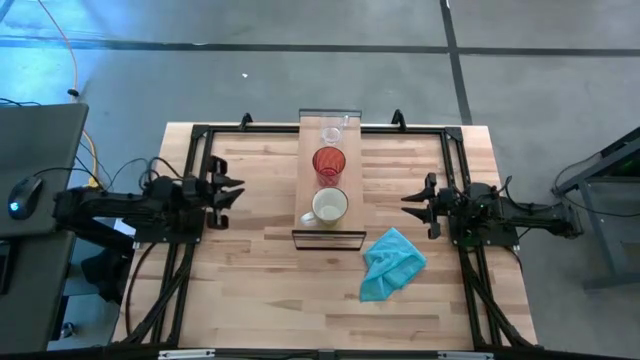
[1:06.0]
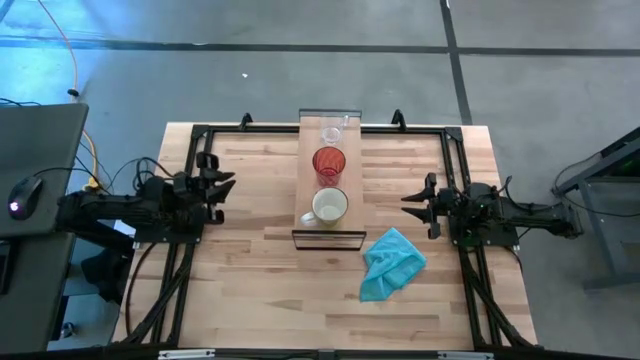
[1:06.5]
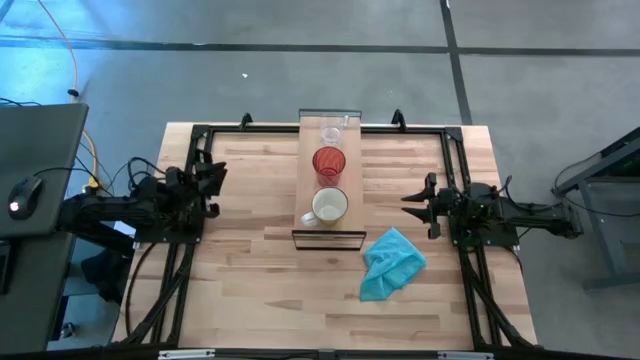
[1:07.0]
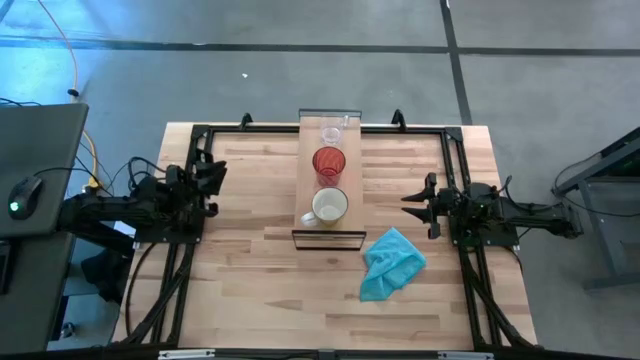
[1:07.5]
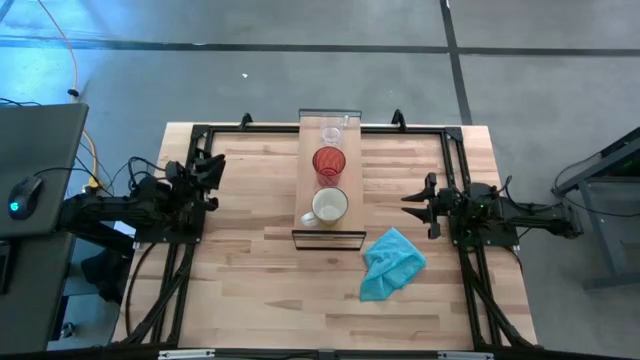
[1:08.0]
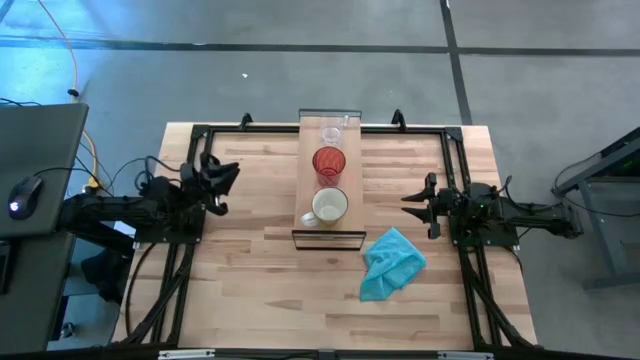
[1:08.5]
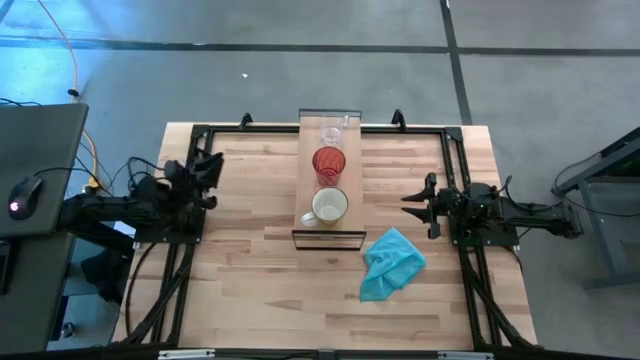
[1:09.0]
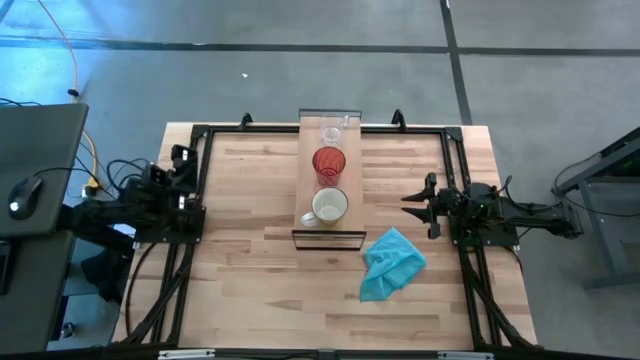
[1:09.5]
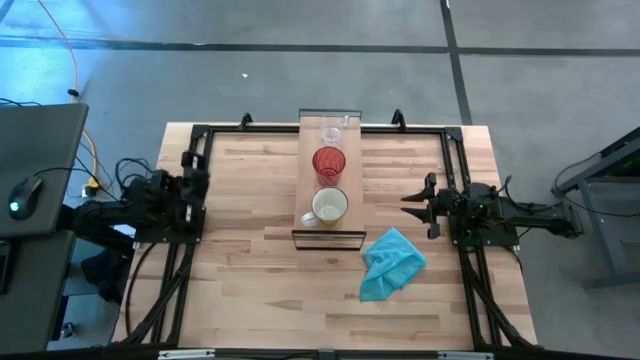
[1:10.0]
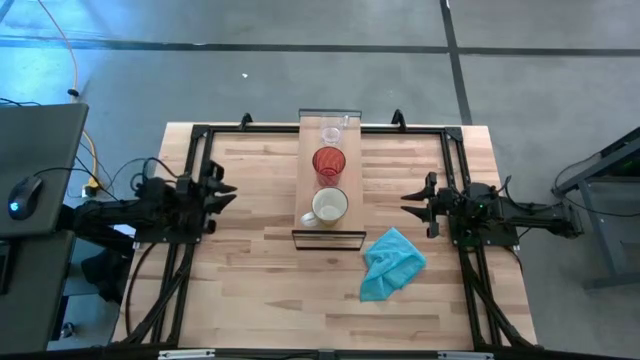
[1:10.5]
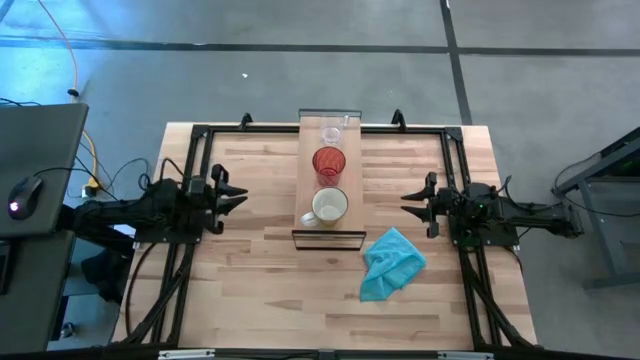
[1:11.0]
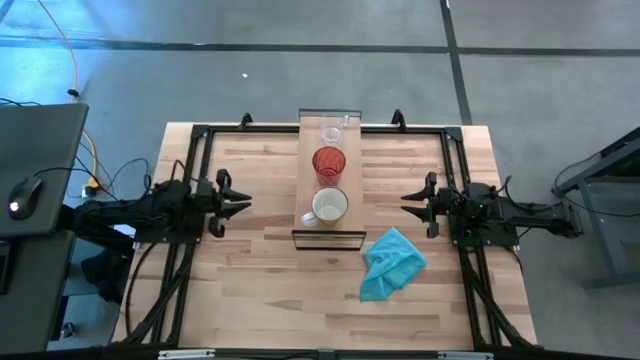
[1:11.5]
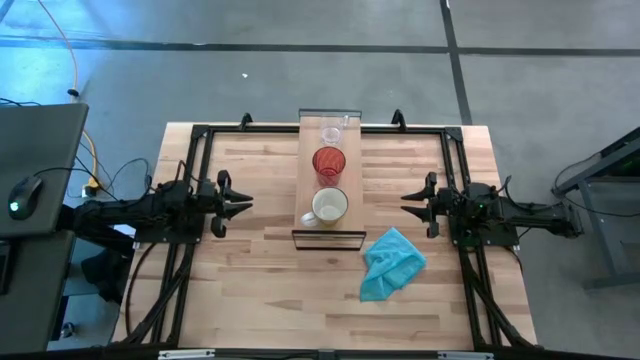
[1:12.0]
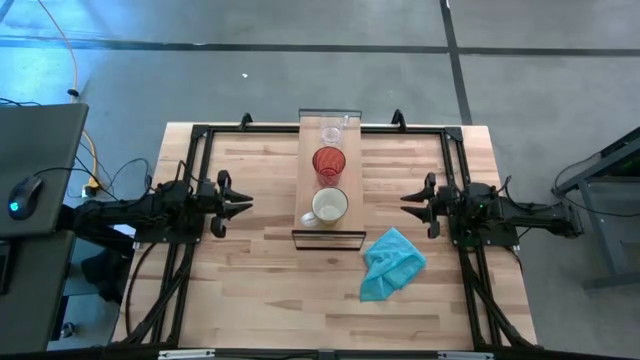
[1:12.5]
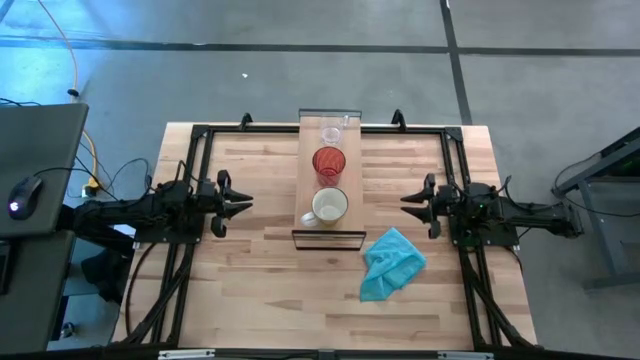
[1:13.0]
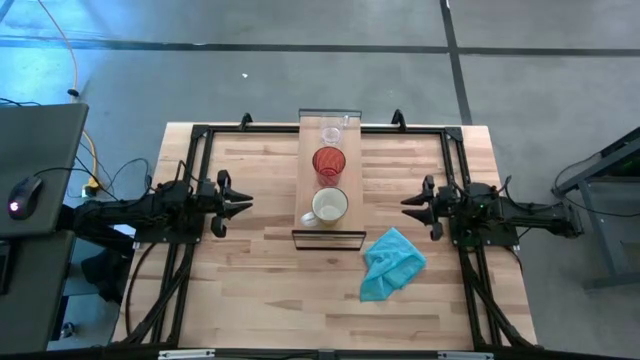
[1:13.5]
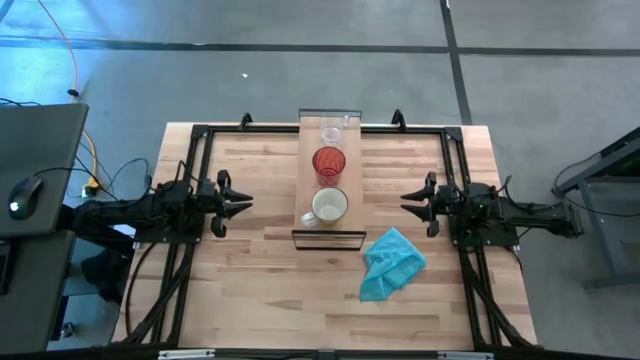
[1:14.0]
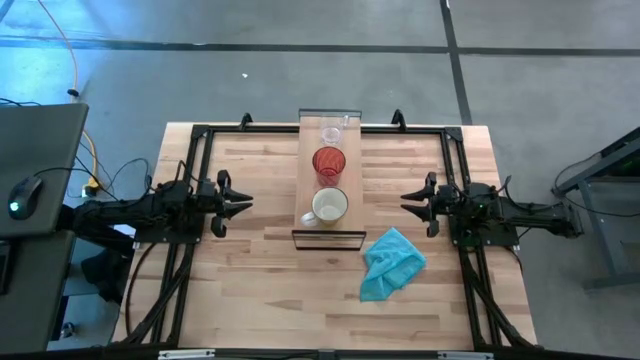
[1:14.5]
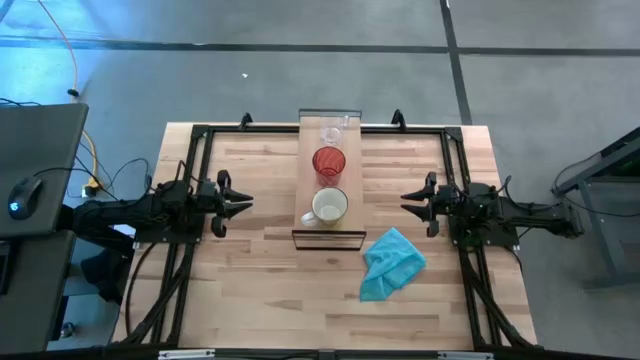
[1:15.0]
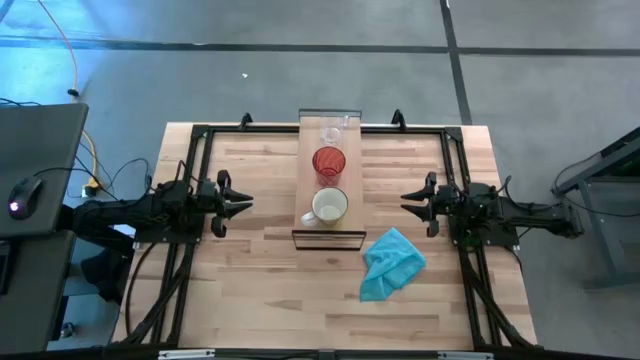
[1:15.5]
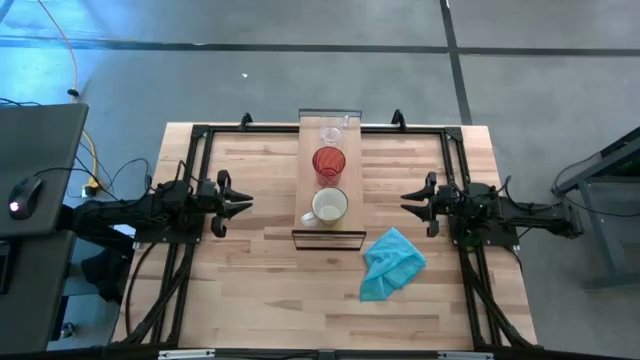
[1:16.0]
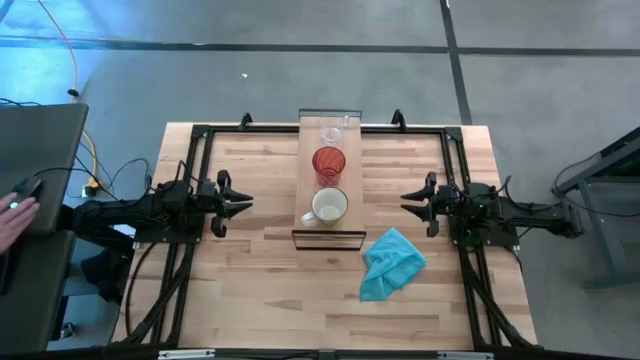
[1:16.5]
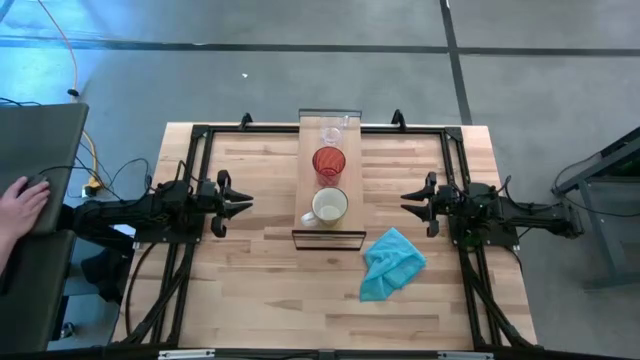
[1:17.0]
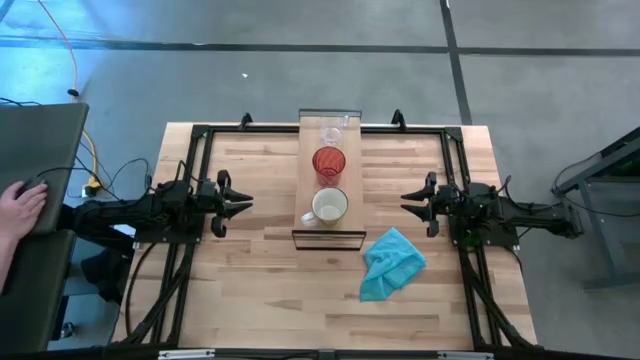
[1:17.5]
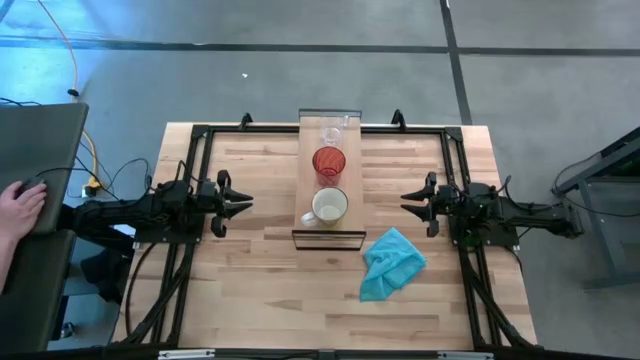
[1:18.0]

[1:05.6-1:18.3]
Task: Stack small to large cups/mugs on shelf
Return to Home Position

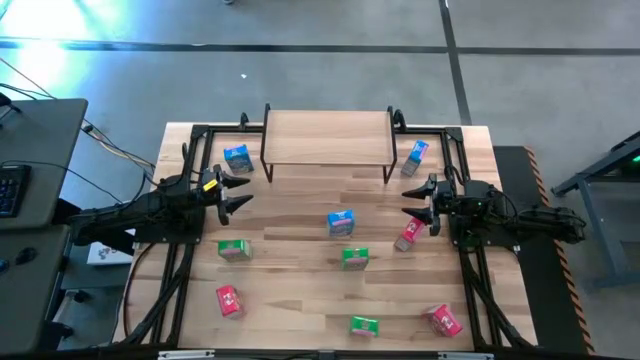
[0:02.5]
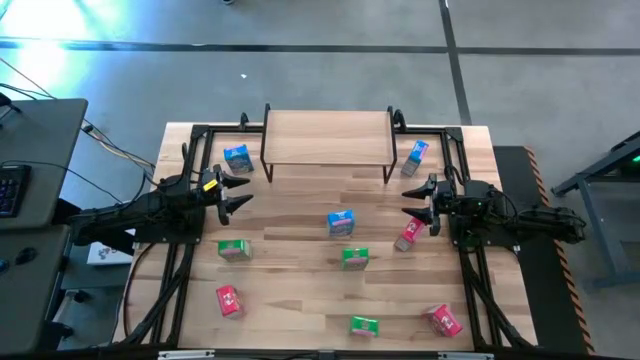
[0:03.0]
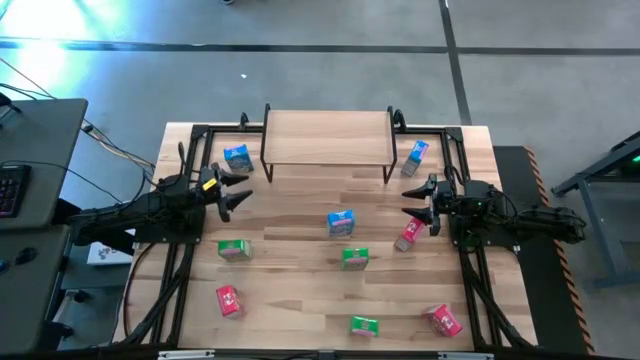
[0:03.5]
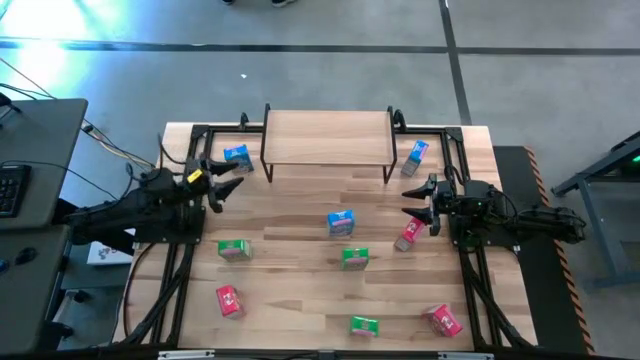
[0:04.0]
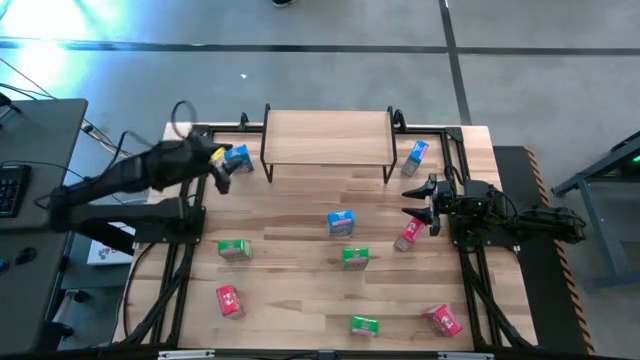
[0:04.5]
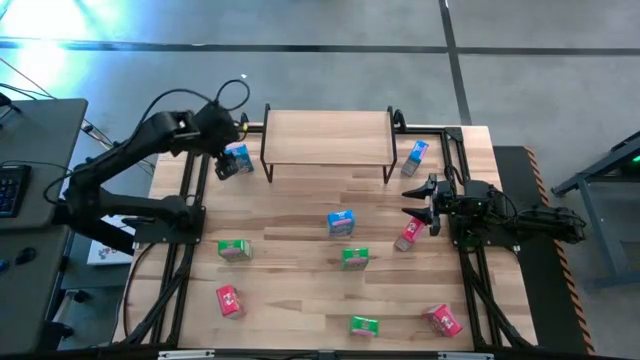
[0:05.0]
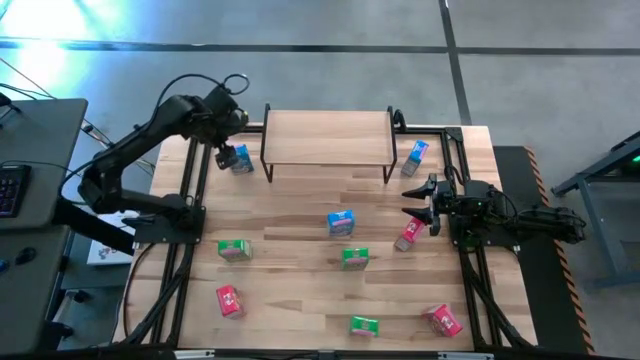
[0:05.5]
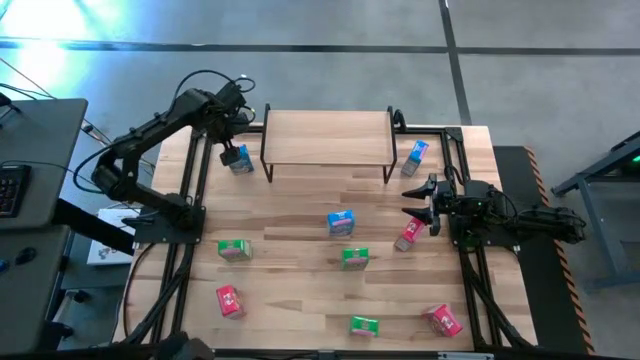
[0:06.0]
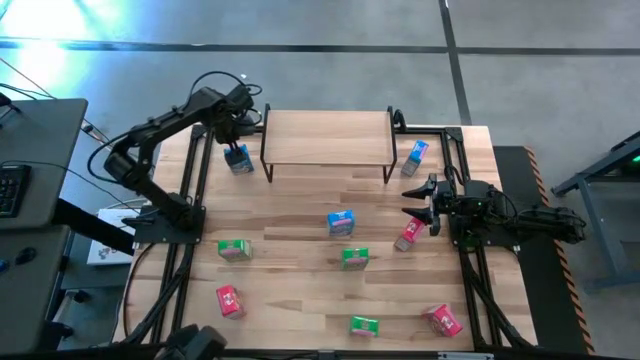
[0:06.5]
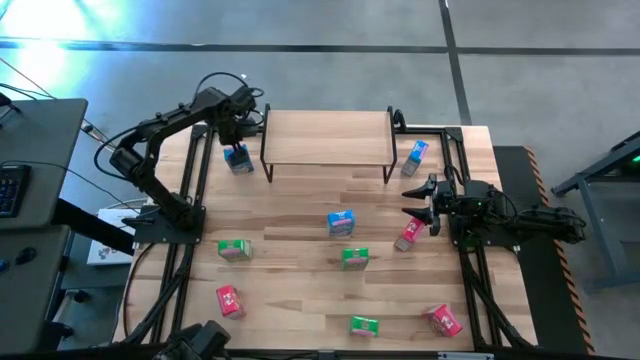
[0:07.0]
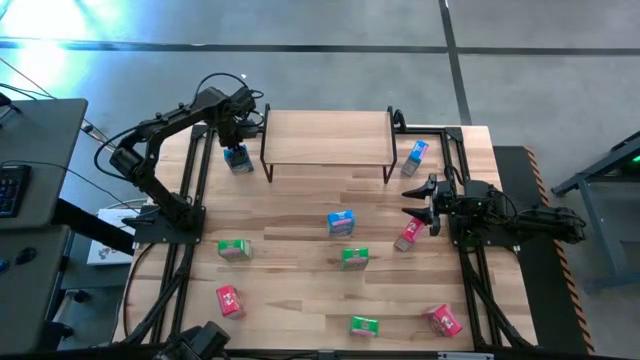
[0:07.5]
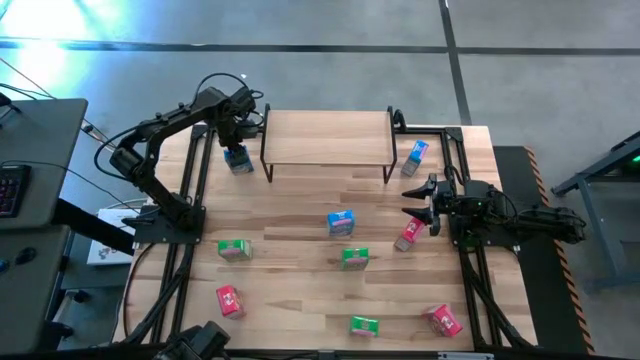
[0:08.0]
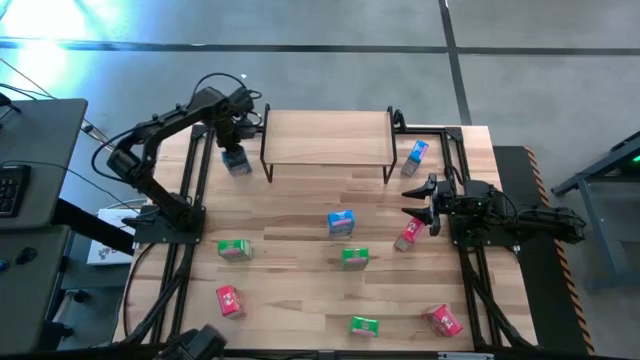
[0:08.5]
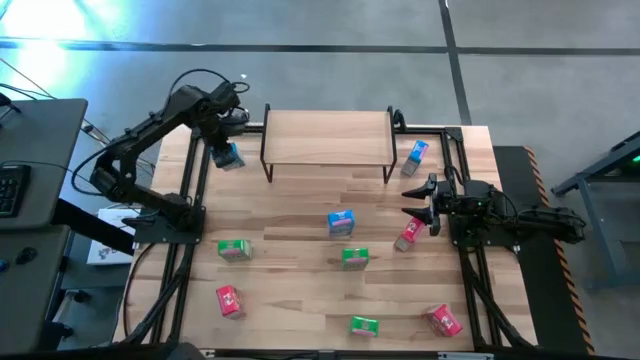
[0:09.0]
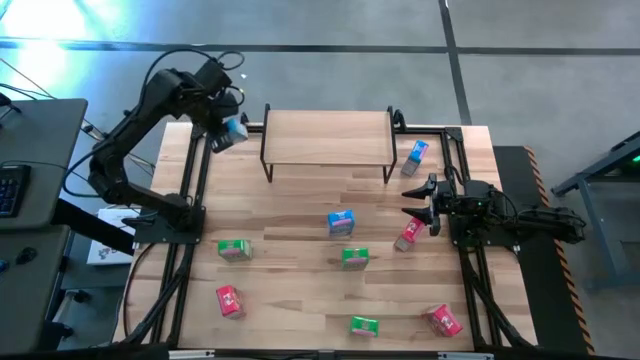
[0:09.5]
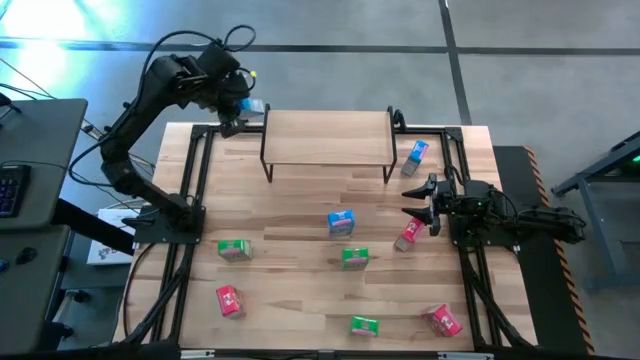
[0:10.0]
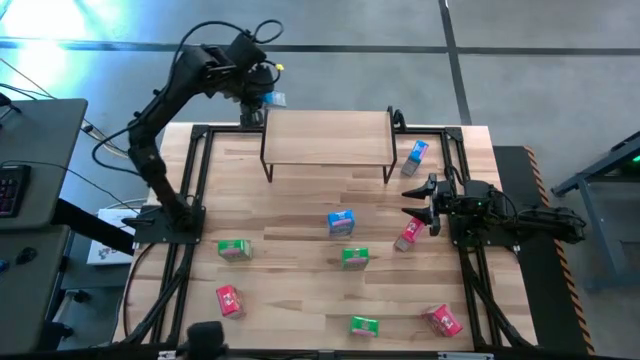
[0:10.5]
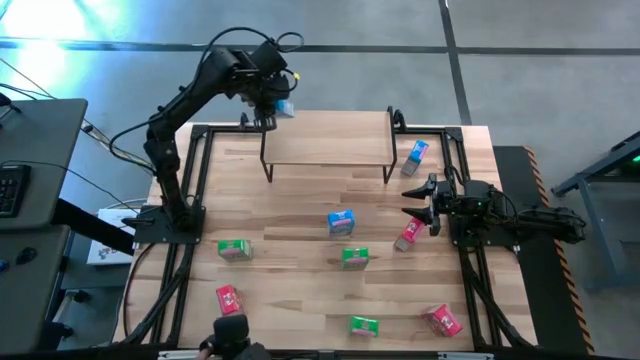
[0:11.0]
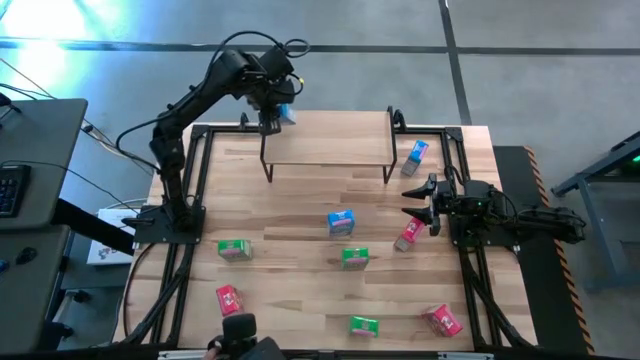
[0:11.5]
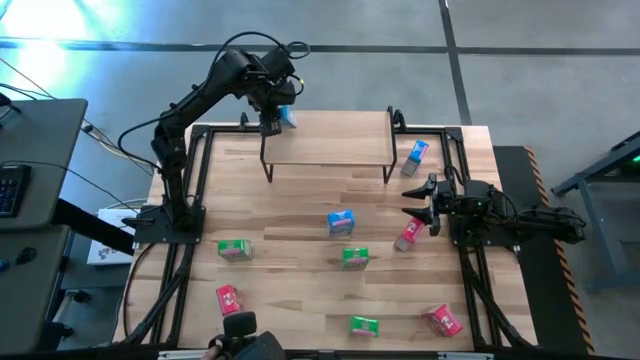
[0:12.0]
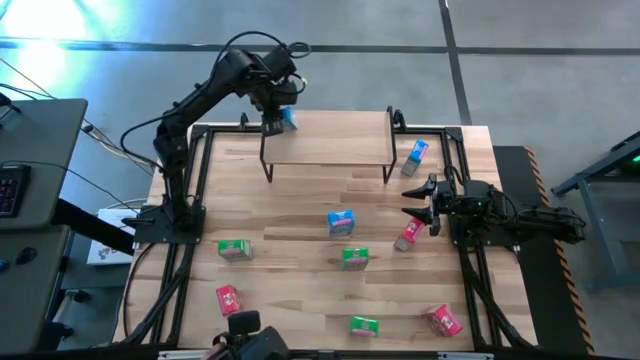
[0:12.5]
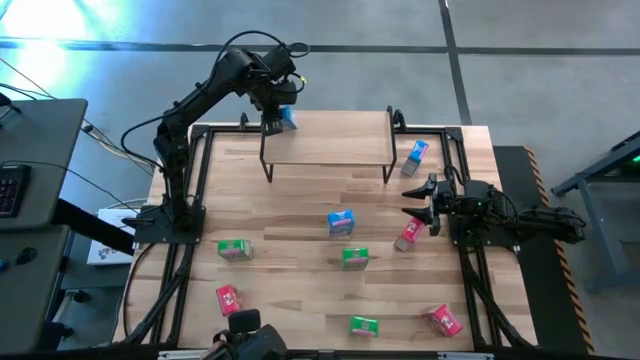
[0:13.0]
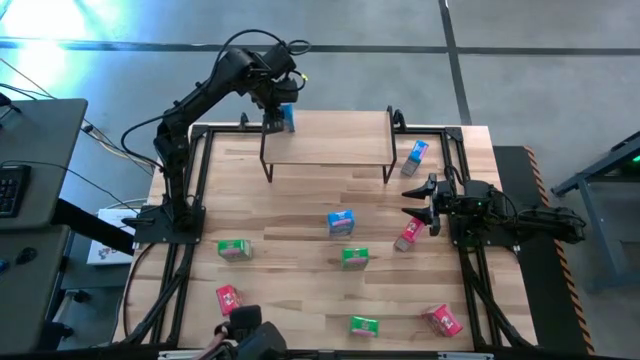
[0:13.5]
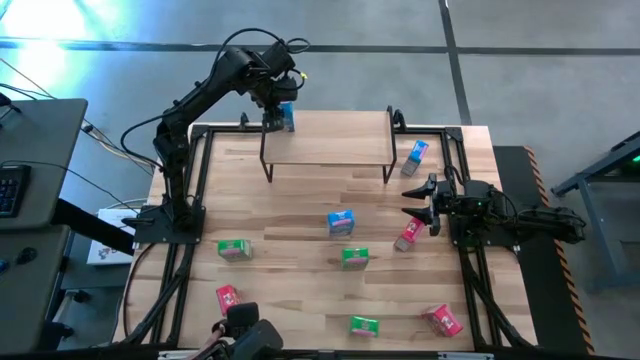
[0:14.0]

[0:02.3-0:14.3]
Task: Stack cereal on shelf
Put the top left blue cereal box on the shelf
